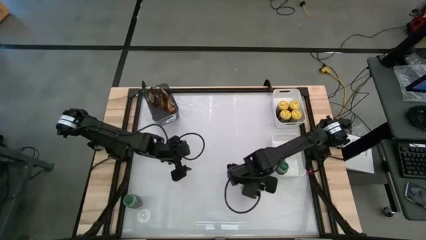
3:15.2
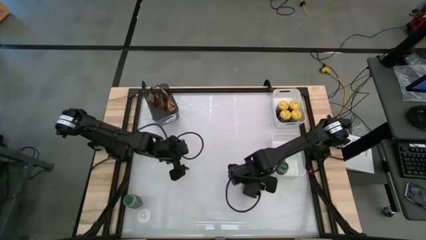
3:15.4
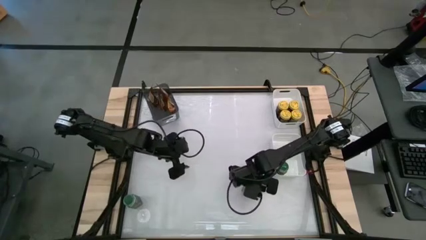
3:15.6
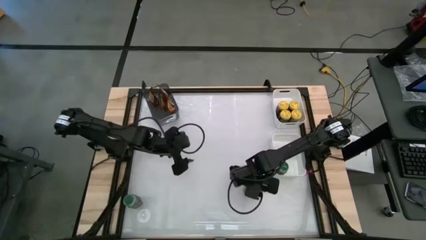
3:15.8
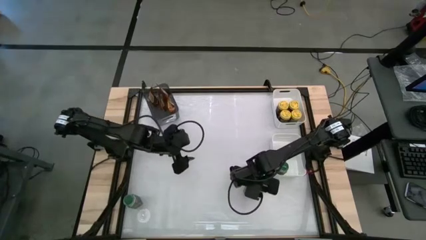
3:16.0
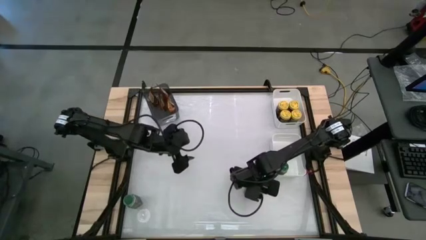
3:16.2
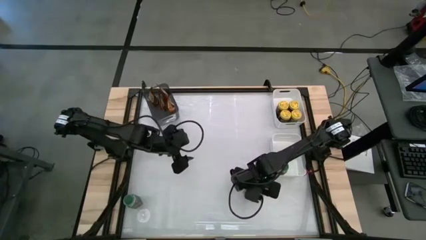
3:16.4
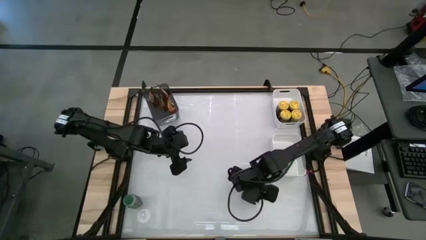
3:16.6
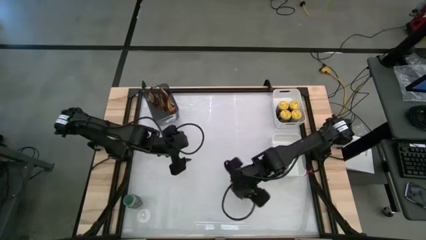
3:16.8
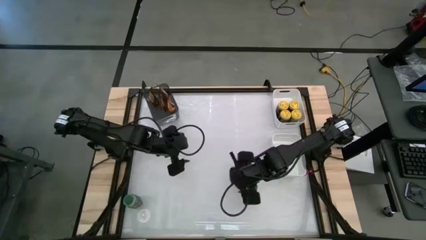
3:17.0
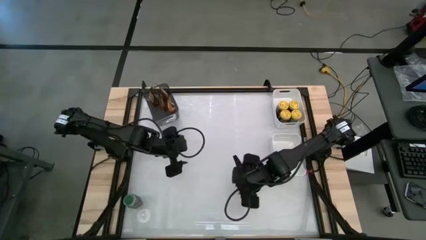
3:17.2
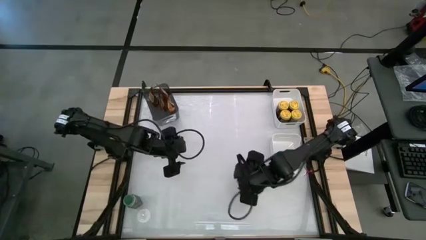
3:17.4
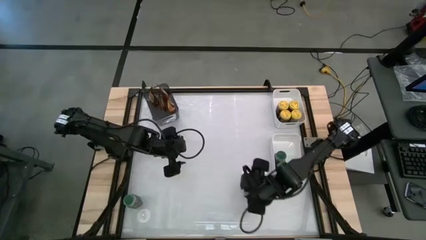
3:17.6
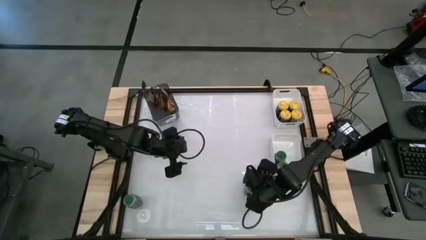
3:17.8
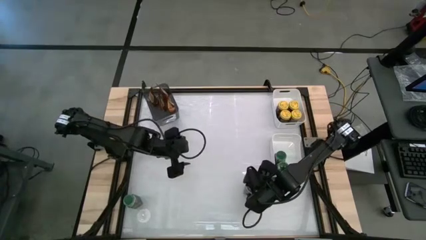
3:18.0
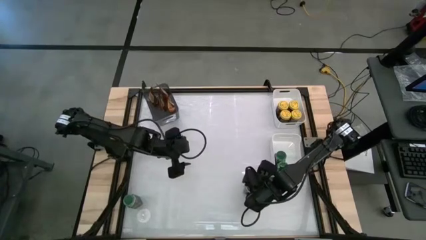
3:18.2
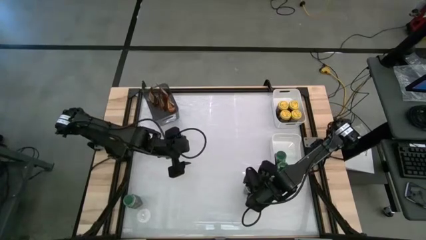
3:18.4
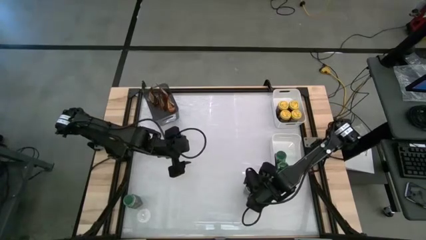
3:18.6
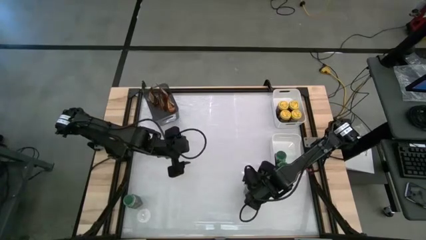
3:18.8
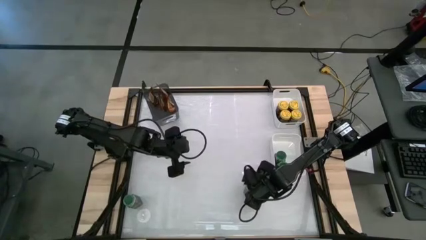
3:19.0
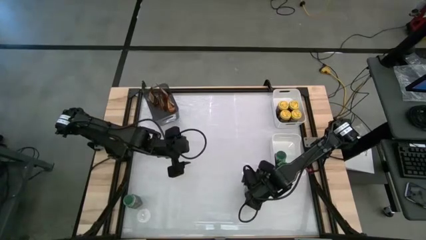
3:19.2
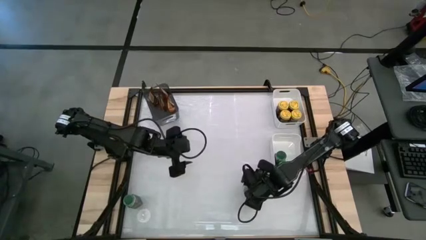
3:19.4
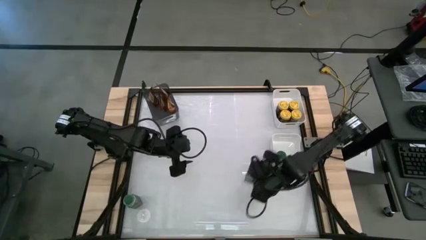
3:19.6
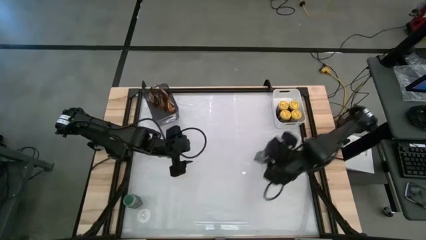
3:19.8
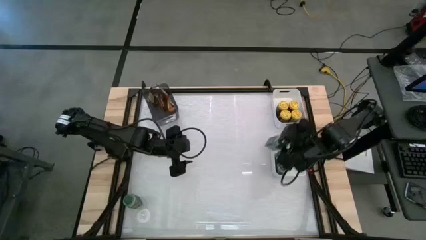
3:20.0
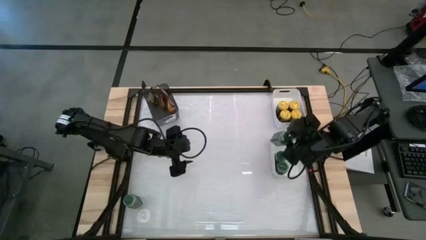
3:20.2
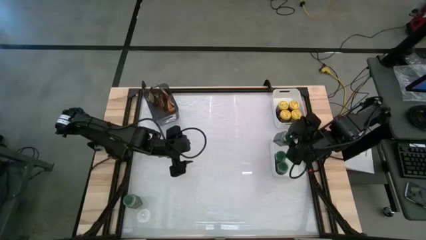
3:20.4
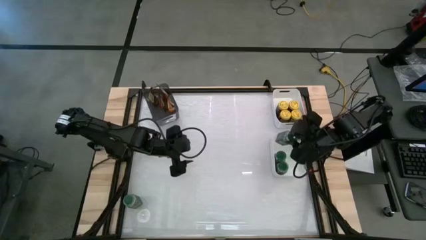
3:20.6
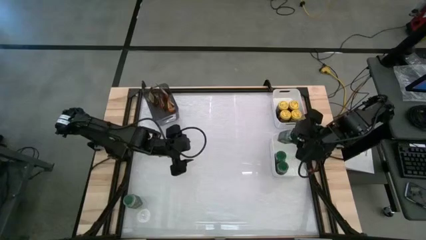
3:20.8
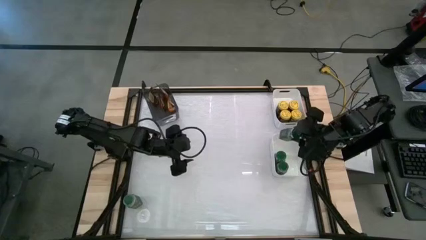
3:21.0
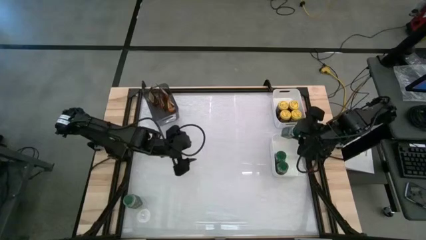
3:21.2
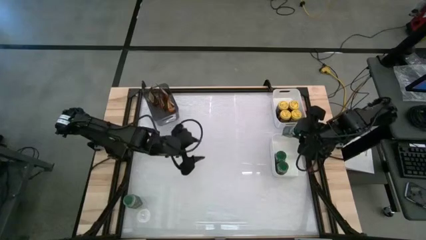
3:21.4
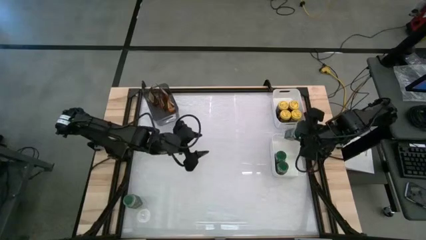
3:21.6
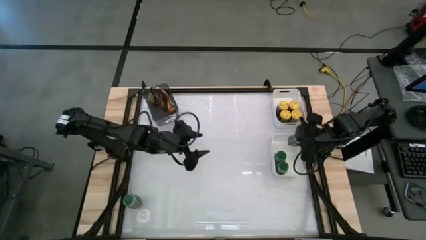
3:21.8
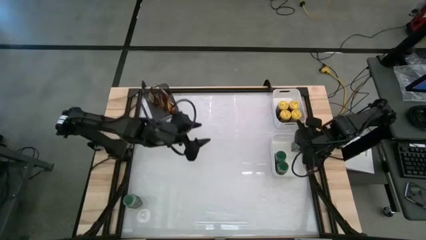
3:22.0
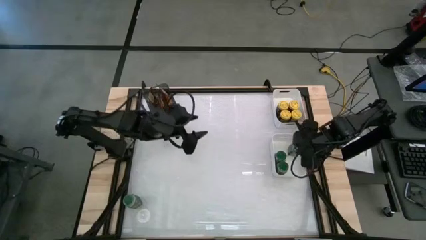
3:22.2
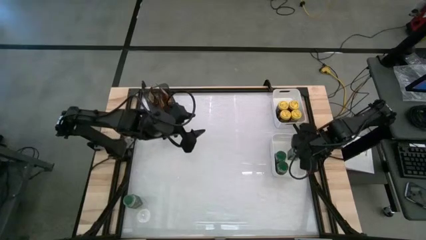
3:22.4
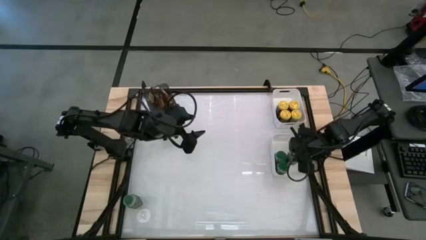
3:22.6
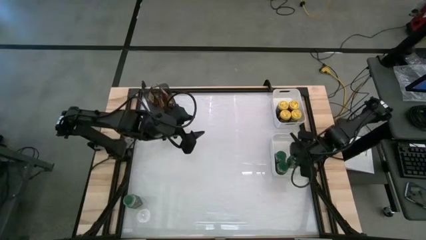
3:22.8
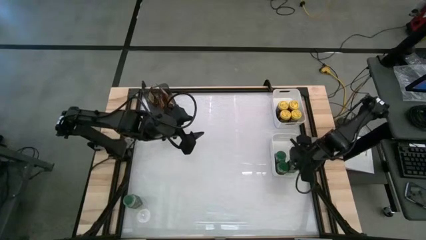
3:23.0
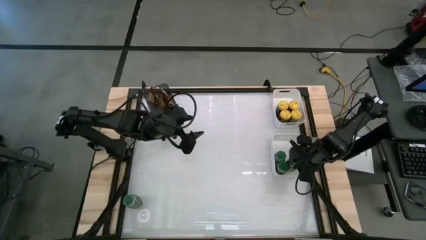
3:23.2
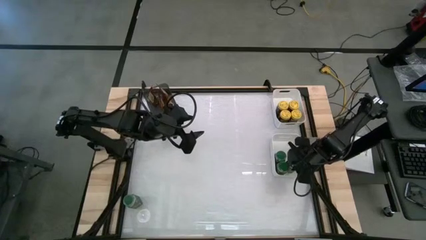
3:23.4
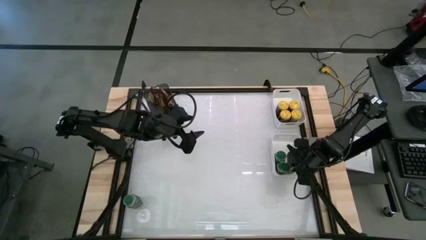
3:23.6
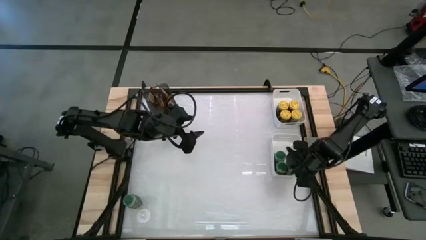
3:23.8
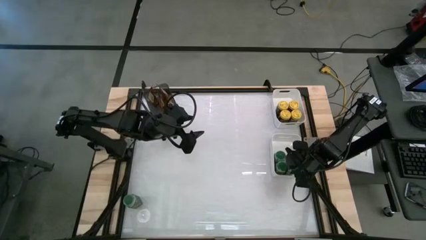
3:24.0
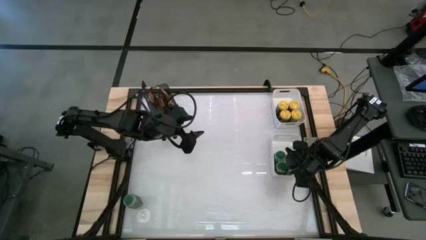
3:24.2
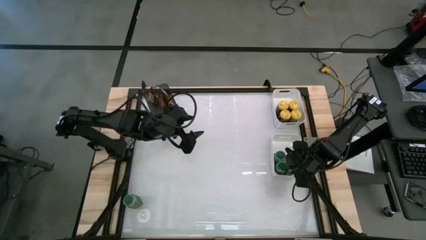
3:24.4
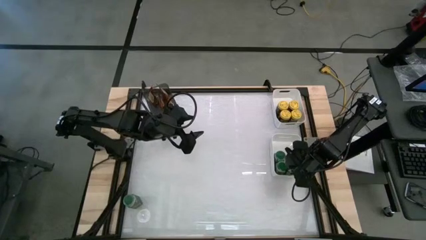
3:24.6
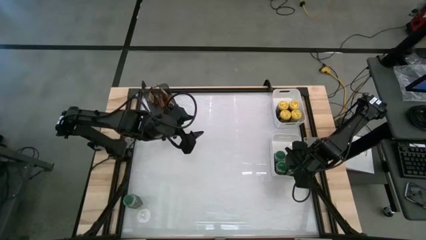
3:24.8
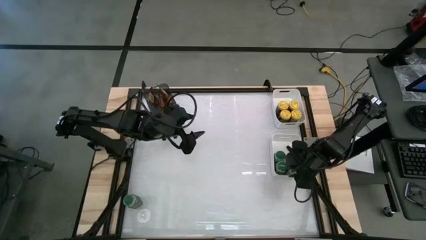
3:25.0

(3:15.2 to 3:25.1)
Task: Sort spices by type
Put the green seasoning bottle into the bottom white bin

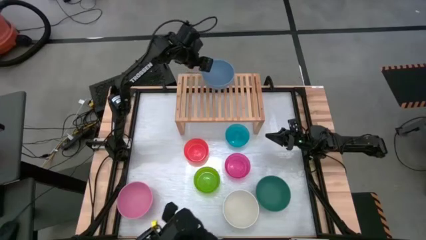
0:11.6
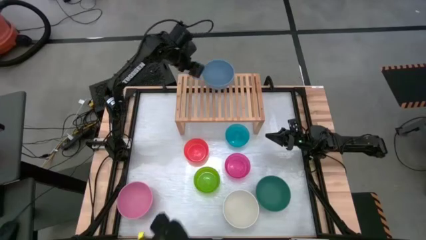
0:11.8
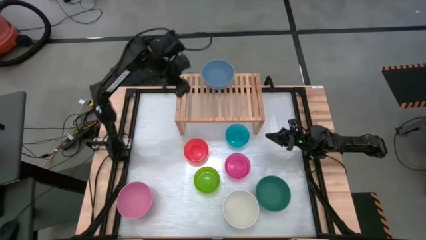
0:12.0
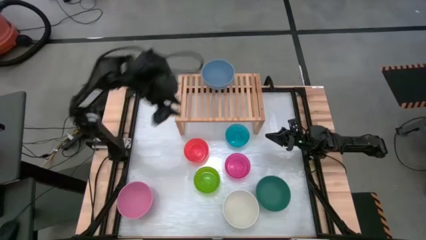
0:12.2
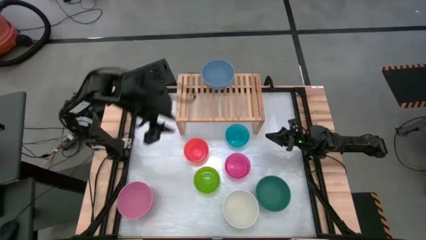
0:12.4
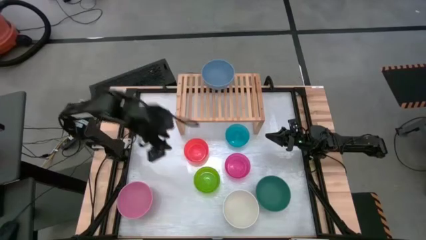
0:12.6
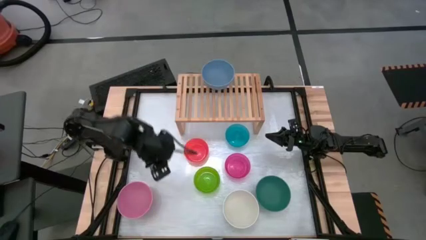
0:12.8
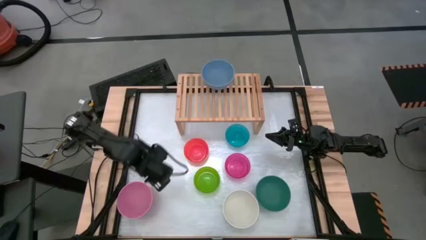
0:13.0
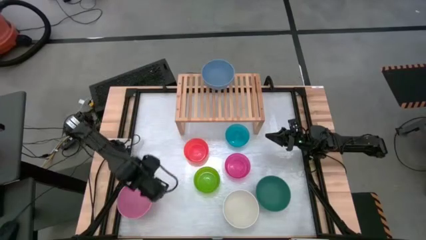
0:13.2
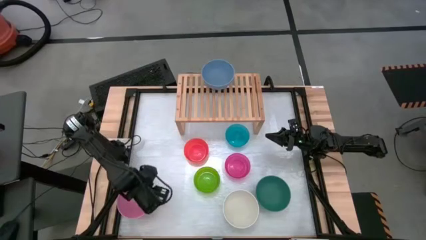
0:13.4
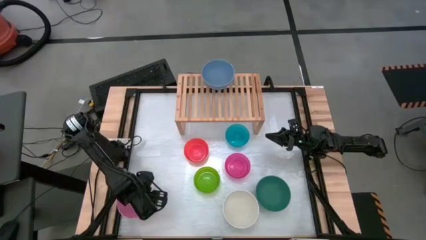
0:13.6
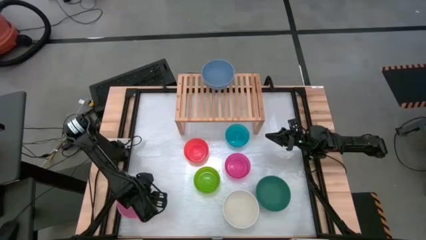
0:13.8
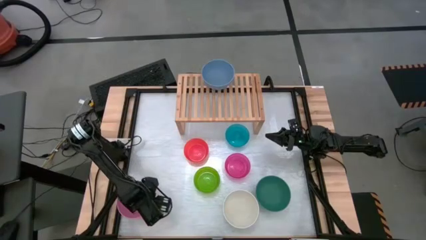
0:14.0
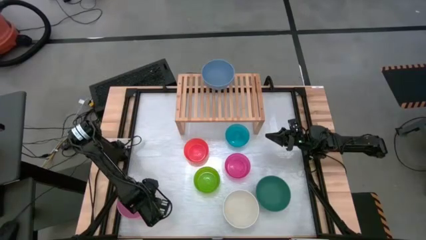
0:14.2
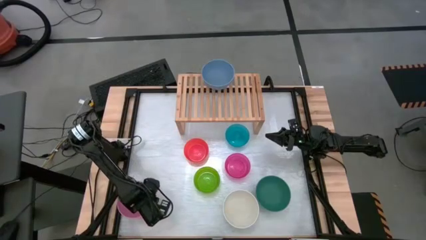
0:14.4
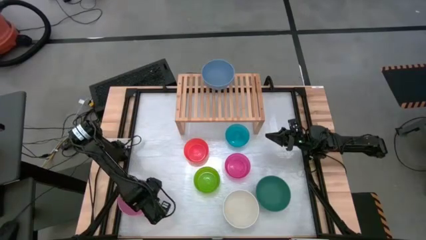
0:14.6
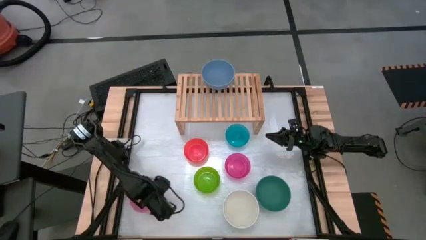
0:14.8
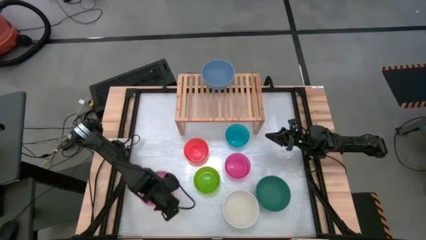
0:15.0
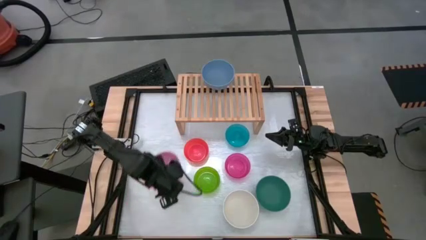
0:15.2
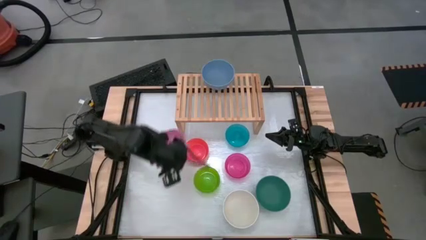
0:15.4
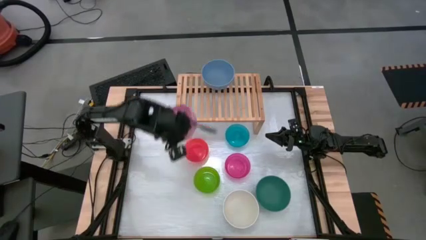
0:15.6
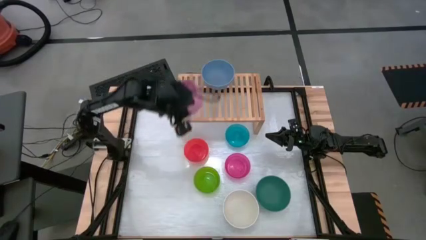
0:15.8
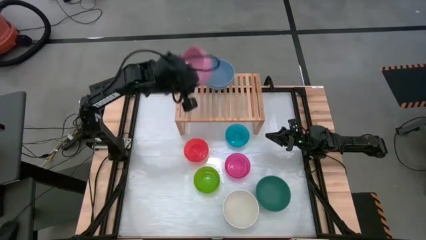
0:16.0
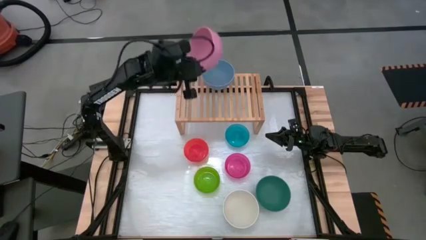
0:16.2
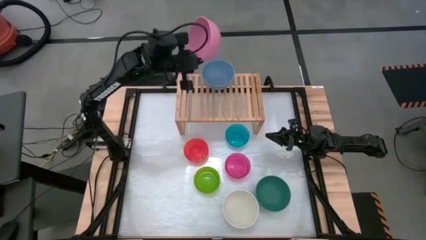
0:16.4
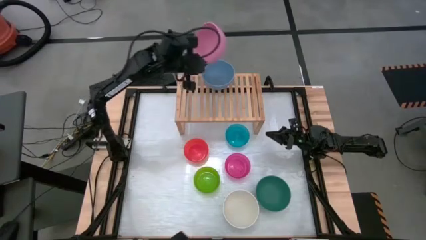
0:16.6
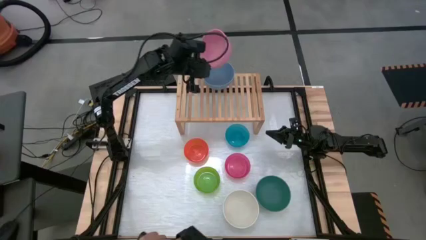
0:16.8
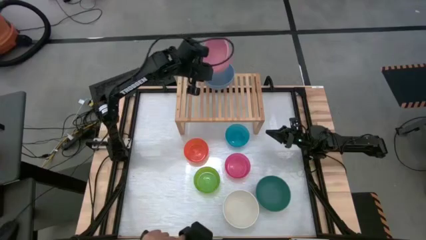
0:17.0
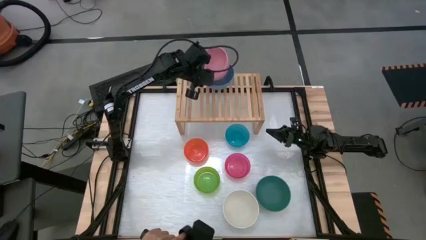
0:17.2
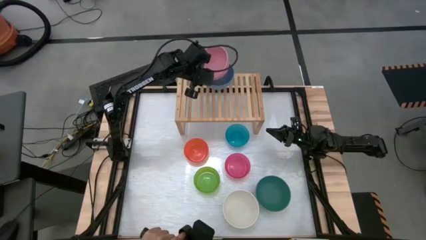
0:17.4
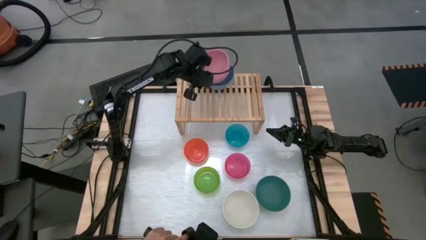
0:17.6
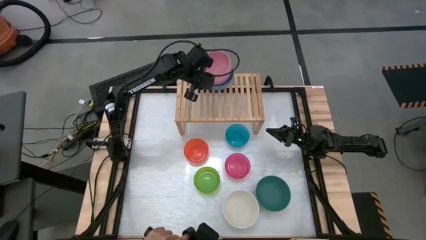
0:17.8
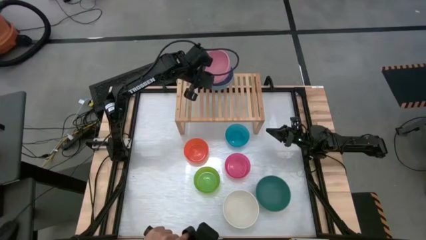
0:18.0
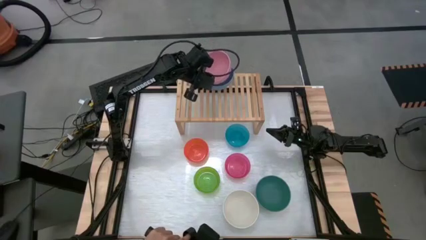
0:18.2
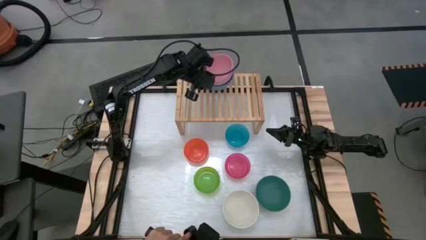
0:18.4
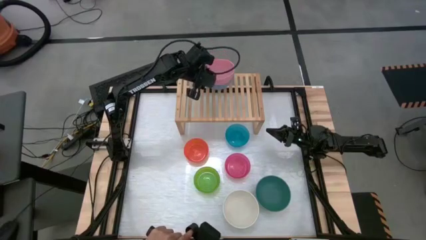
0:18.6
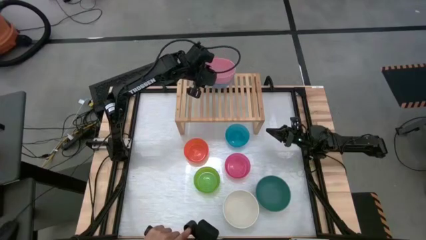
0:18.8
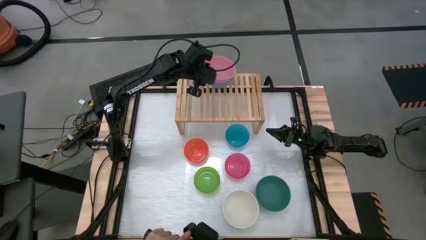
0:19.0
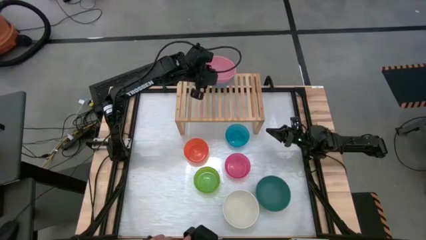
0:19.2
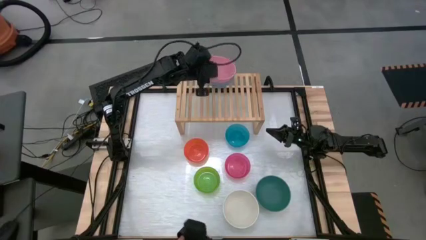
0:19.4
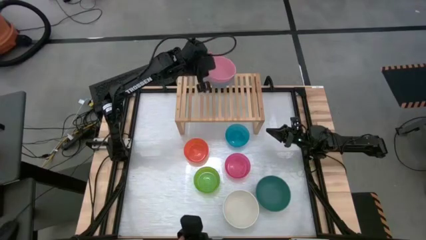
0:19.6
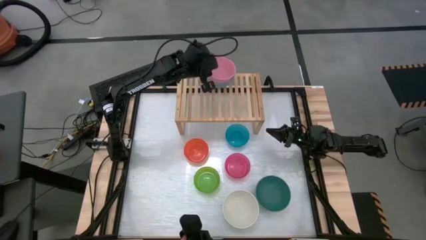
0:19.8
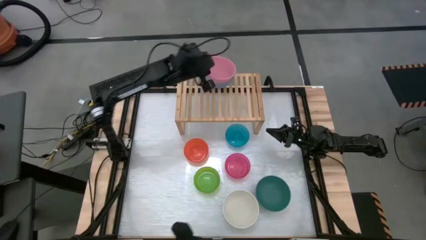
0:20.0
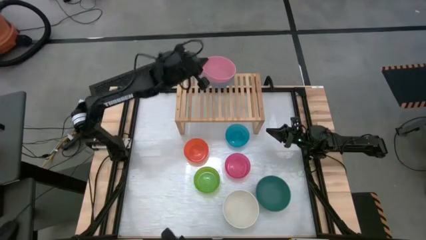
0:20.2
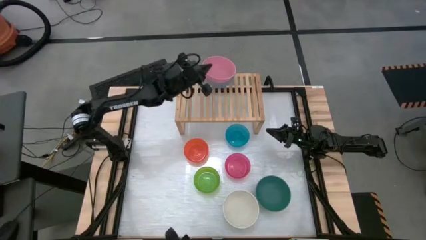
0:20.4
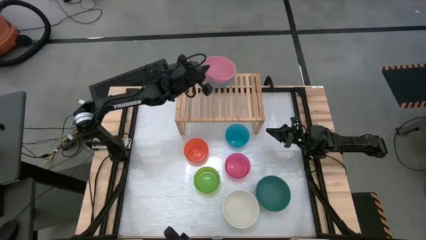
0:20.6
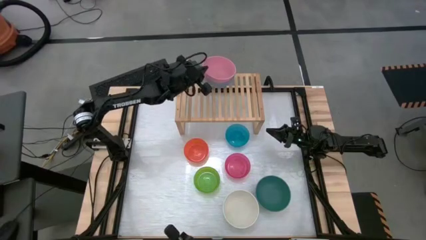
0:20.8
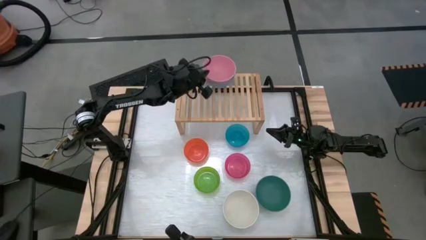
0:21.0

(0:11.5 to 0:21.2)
Task: Place and stack bowls onto a shelf
Stack the left pink bowl on top of the blue bowl on the shelf
